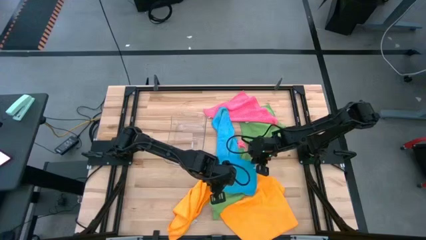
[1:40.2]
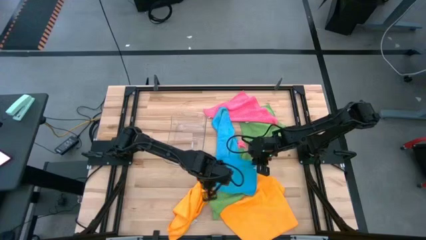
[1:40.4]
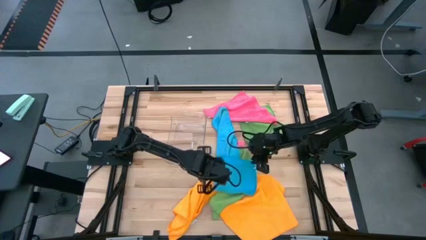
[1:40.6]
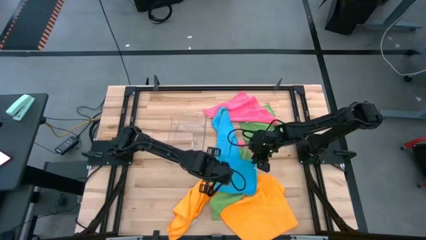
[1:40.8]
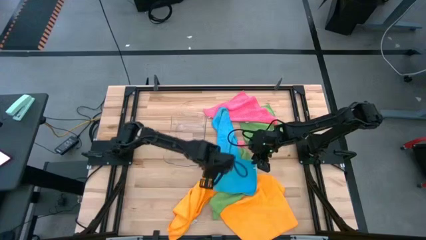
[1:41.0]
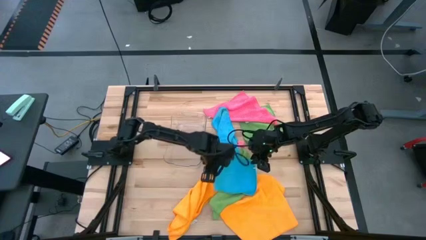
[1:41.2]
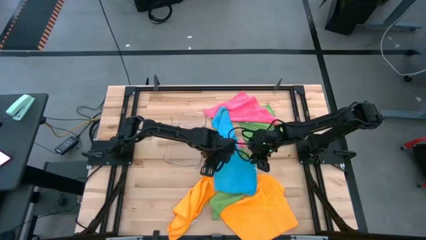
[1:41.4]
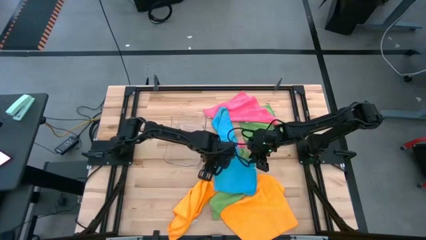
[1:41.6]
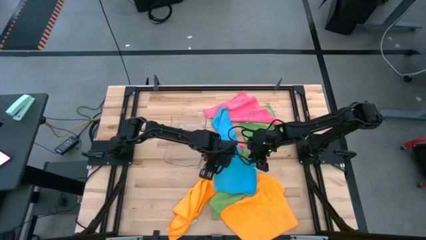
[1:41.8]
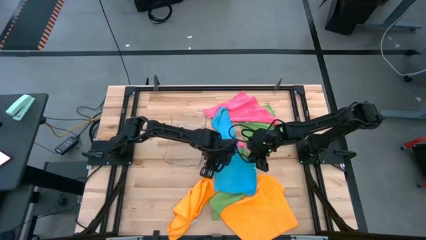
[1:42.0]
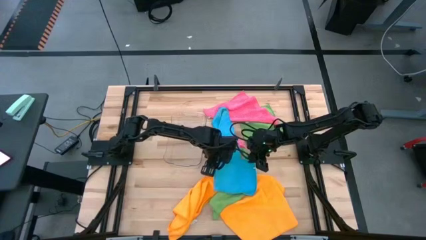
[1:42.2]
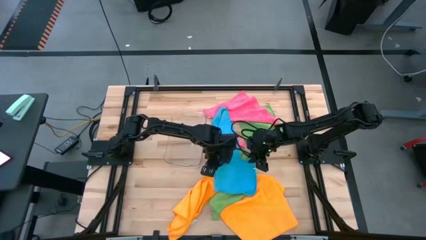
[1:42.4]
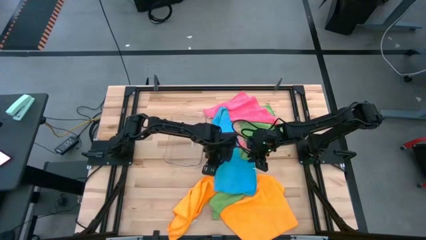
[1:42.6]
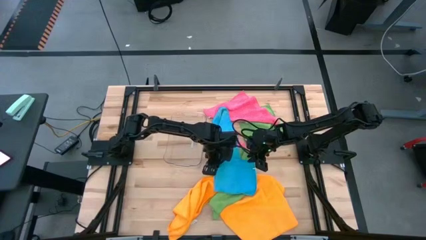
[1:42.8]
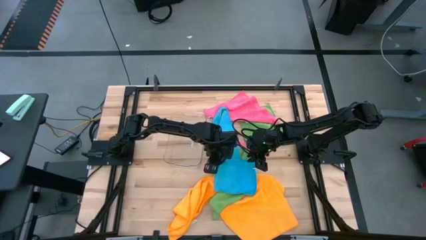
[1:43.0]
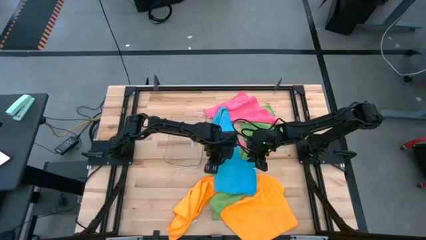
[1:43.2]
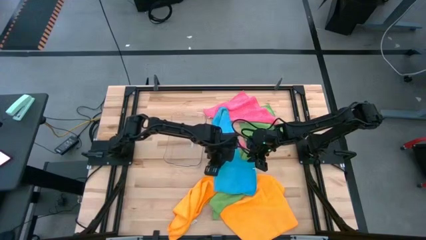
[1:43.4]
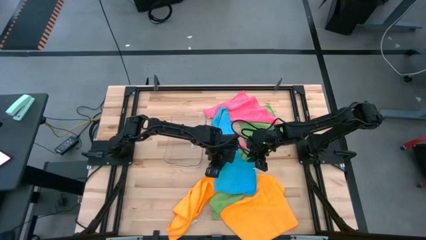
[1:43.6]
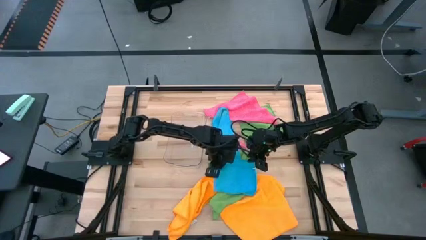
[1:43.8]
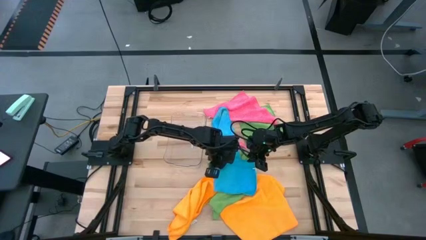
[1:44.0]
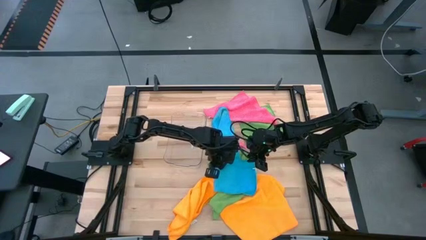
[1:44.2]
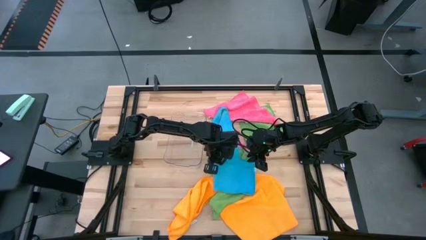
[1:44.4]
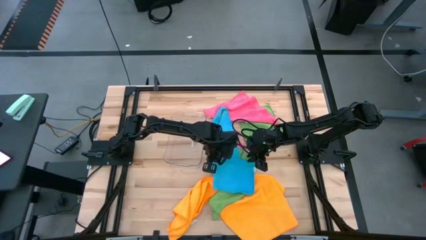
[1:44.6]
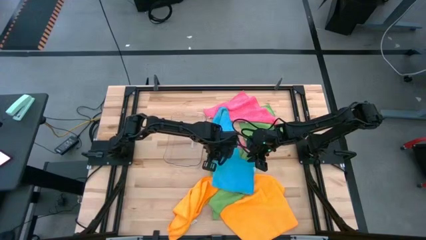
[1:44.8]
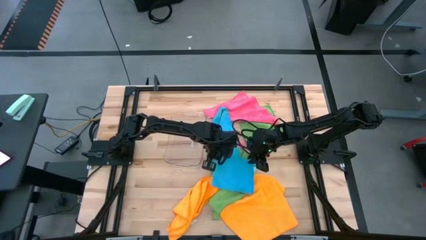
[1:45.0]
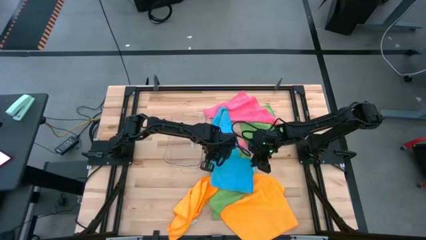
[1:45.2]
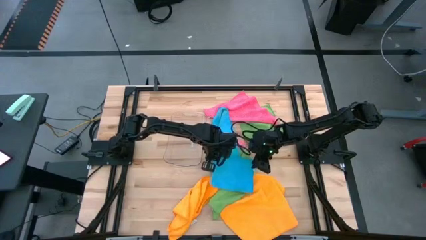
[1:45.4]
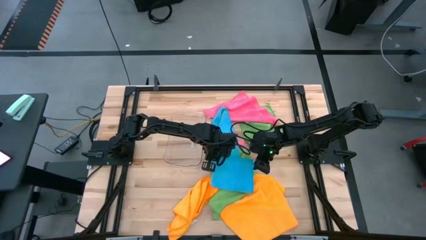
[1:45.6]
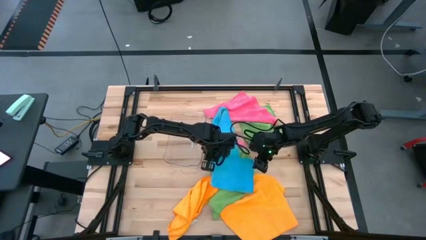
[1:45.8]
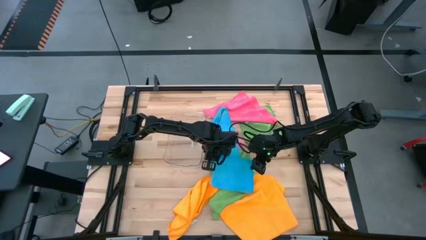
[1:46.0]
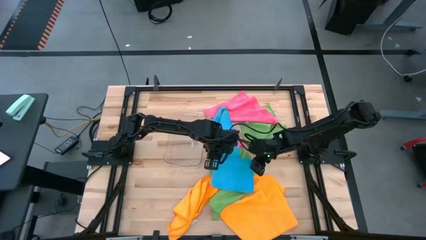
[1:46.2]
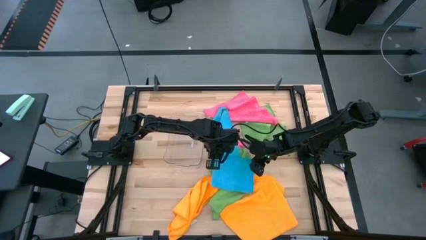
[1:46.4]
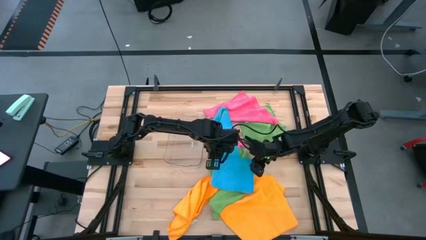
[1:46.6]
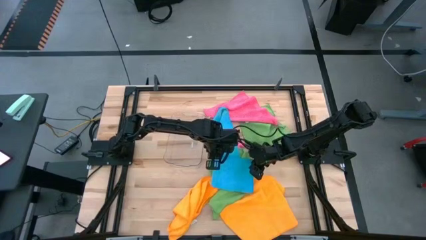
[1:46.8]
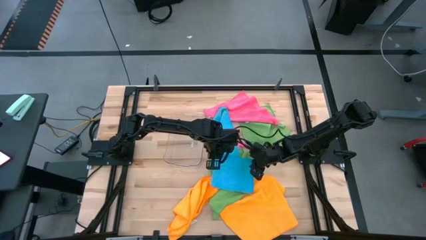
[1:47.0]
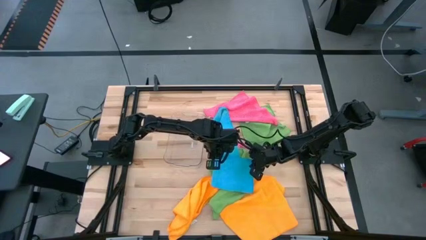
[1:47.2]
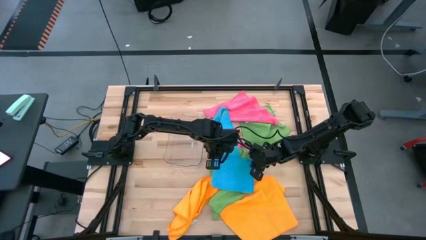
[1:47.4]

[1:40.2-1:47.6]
Task: Fold microfiber towels
Fold the left blue towel
